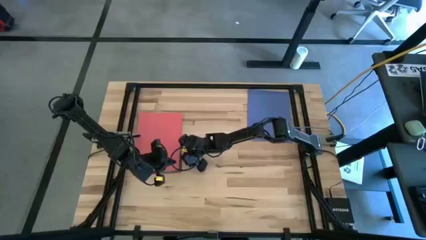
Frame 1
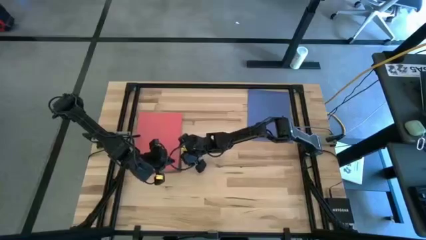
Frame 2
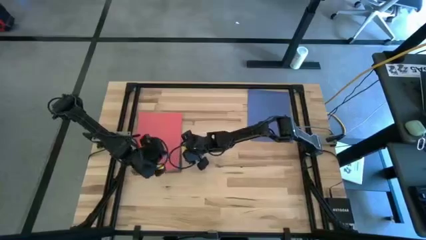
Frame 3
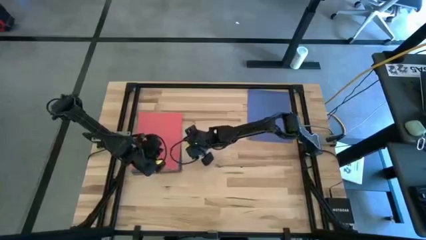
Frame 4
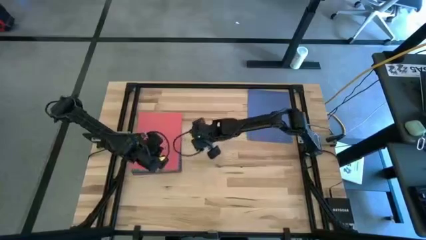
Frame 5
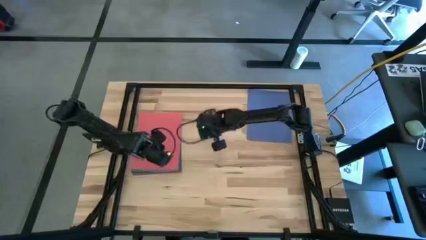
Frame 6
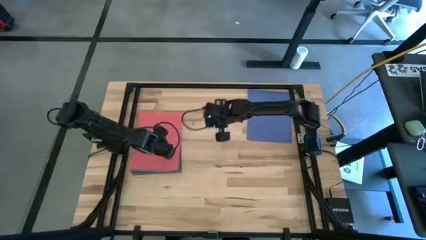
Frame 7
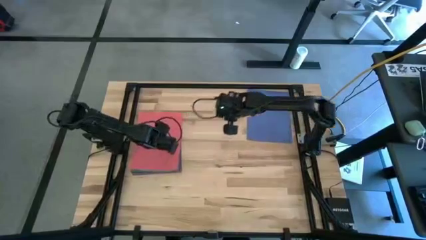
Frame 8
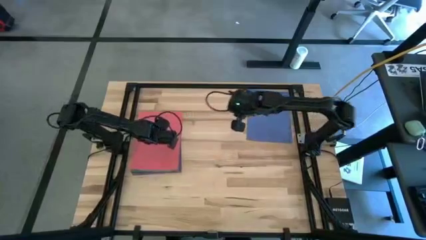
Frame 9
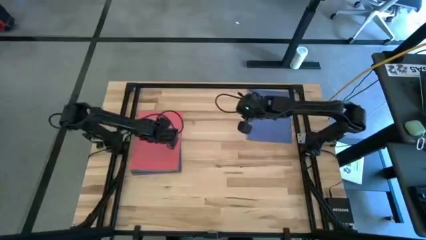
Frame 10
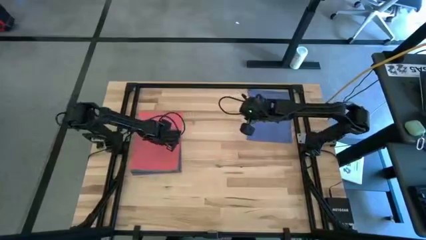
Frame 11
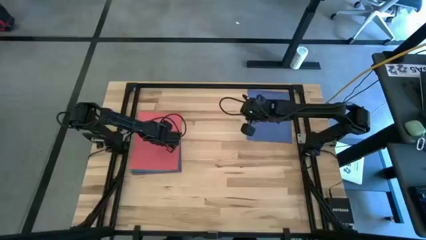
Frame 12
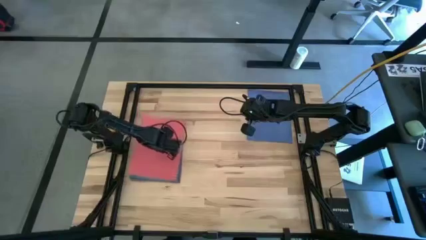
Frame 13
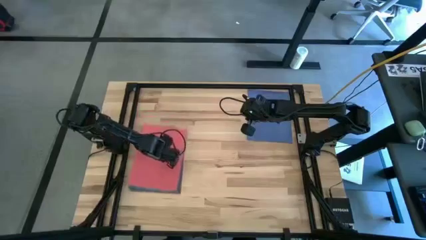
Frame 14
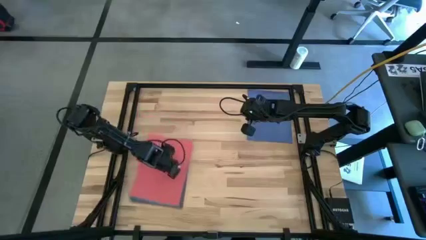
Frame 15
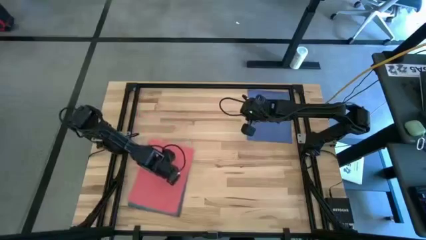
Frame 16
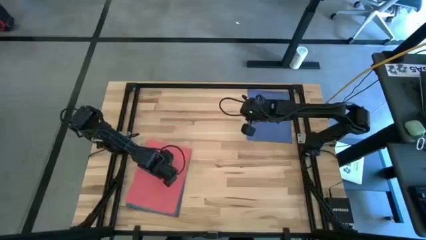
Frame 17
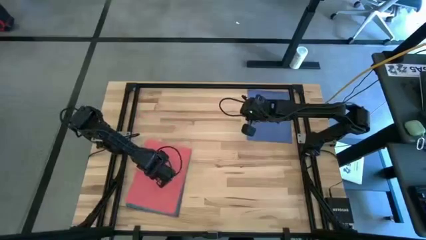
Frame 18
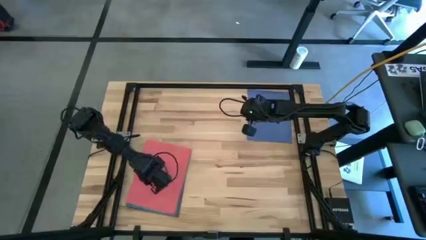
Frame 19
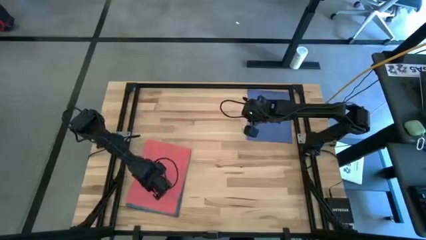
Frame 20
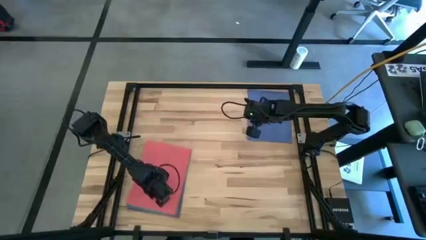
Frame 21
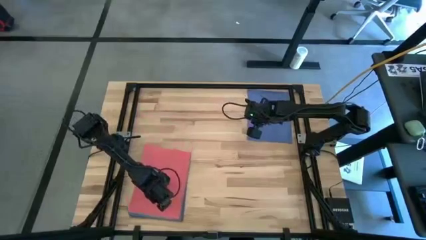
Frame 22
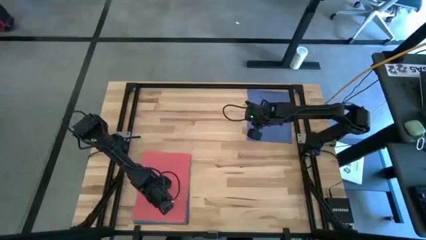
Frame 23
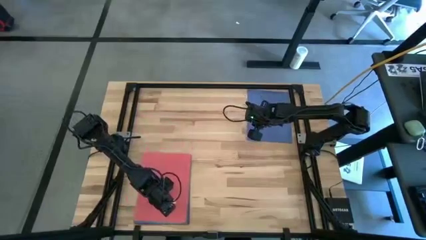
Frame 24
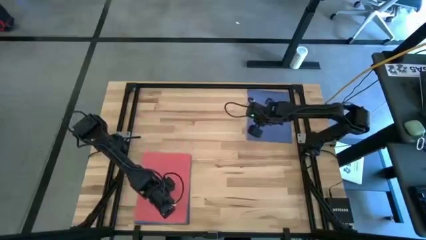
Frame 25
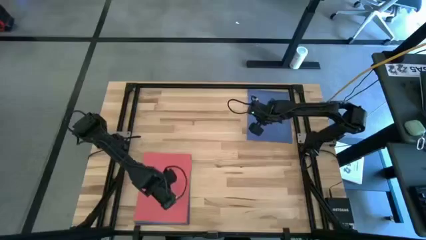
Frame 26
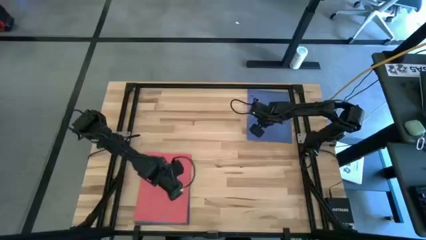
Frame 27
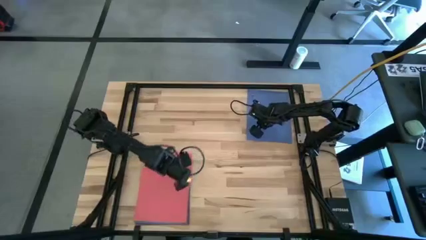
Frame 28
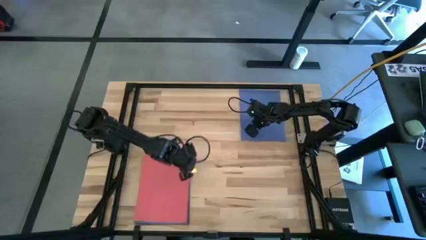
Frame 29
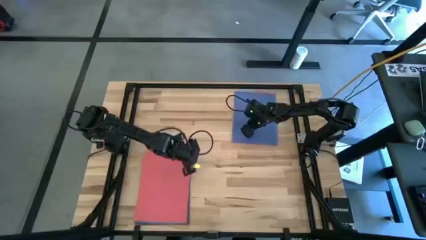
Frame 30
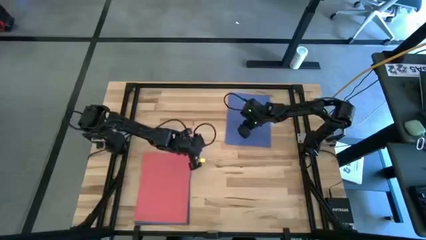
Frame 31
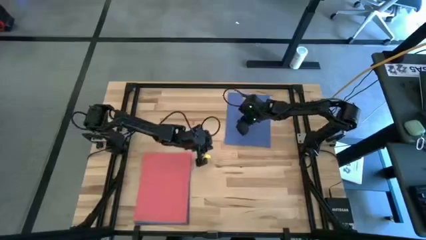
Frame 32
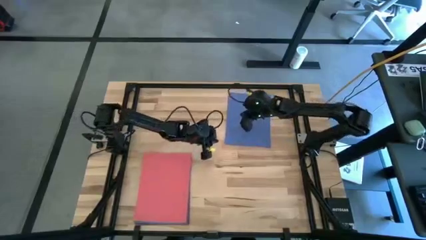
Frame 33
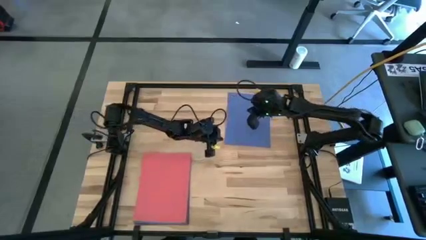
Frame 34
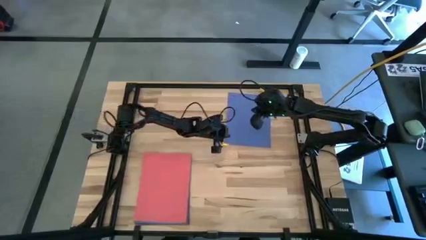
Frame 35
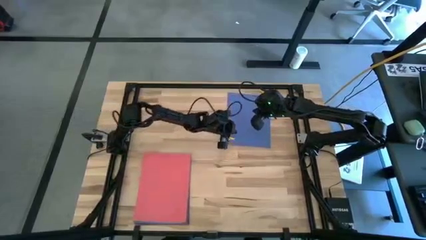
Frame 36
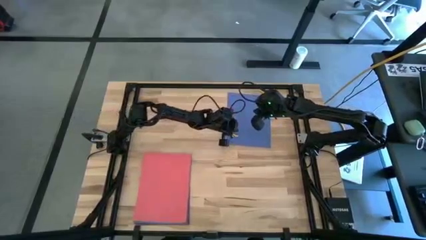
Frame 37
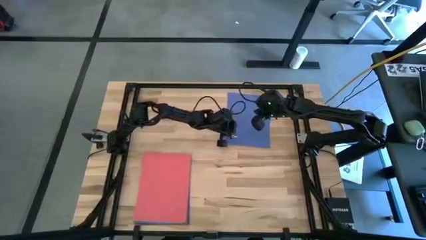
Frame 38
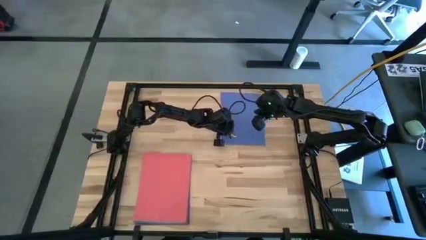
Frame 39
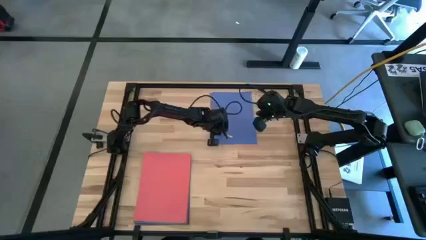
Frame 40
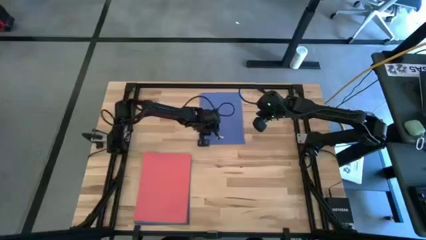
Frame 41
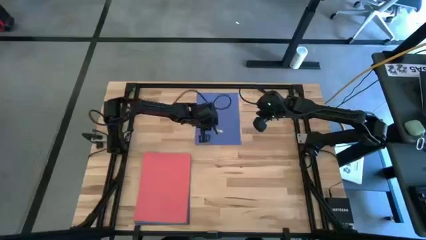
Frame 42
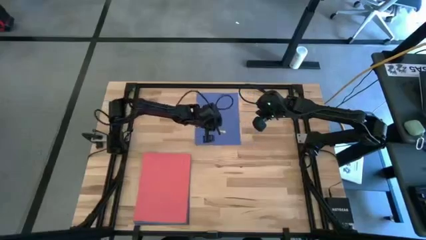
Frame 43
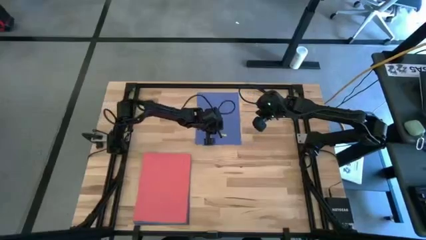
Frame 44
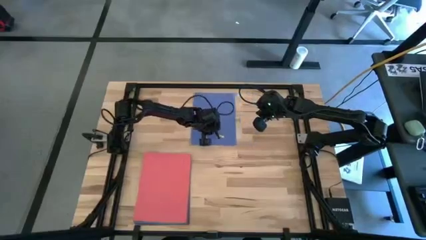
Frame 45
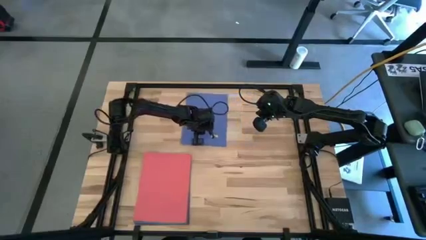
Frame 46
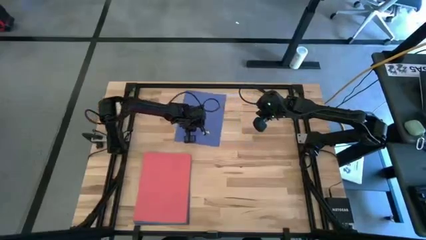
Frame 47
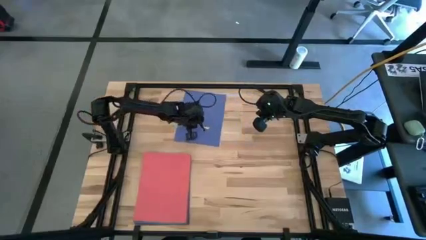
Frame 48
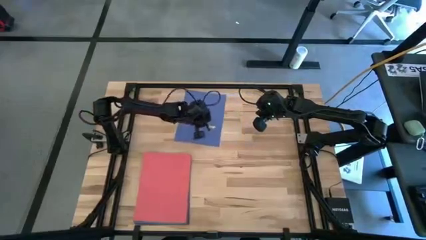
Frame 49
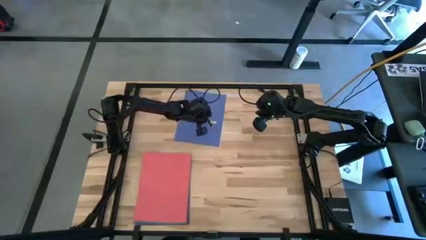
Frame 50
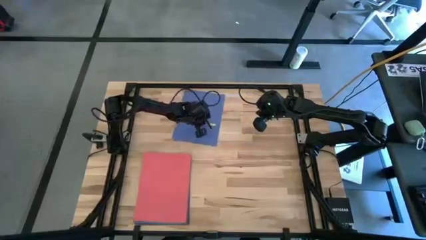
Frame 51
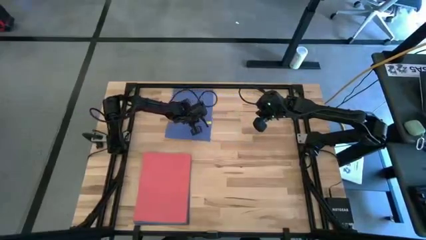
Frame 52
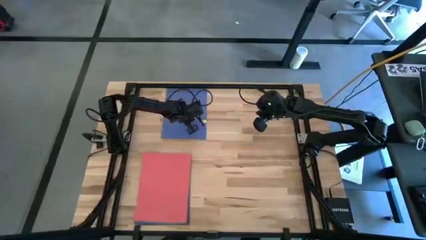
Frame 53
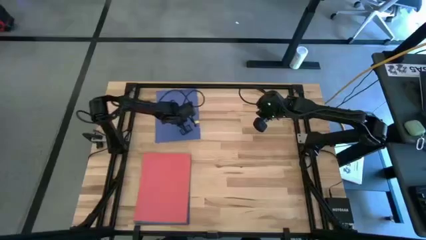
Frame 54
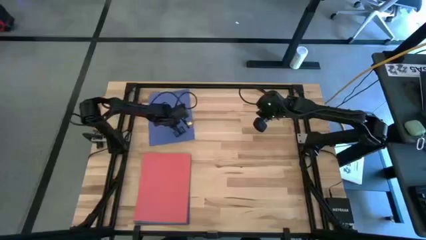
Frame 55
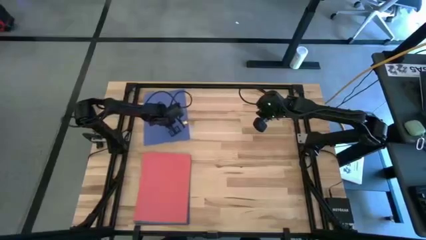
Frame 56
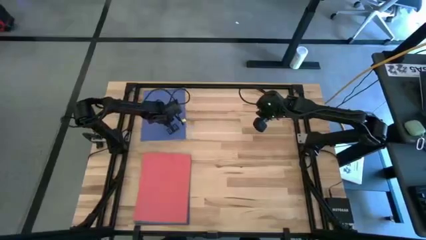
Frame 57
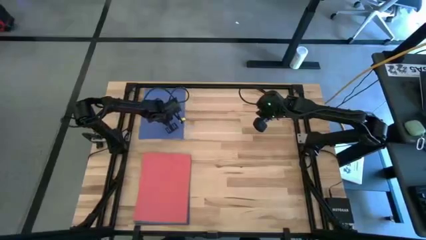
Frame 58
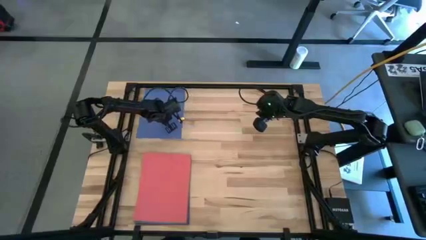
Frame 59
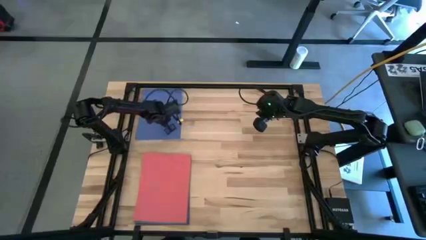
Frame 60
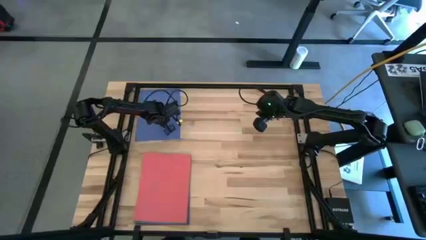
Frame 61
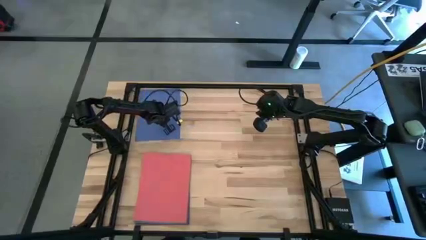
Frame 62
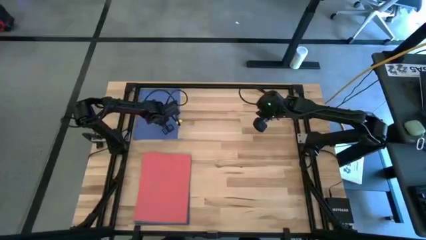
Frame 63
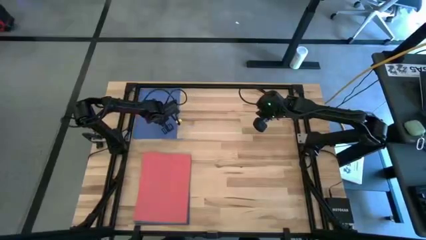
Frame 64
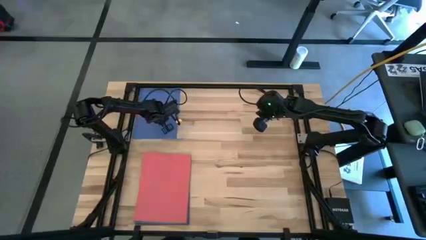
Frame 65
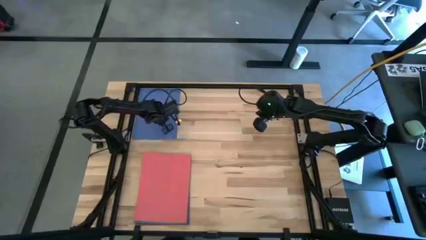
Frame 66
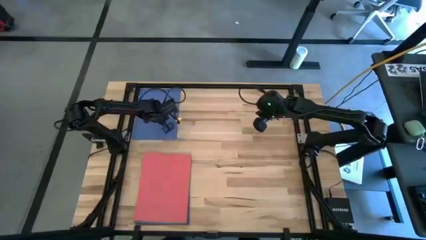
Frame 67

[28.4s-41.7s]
Task: Organize paper
Move the blue paper to the top left of the table

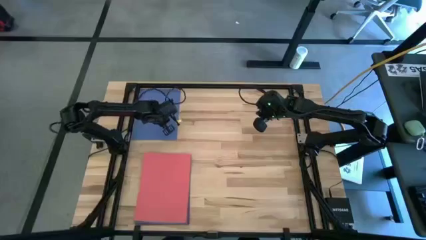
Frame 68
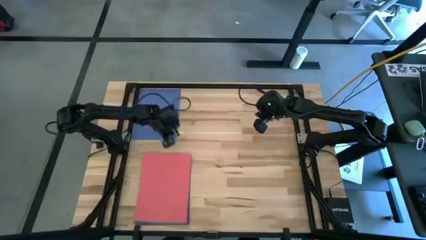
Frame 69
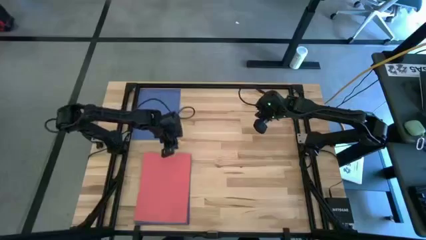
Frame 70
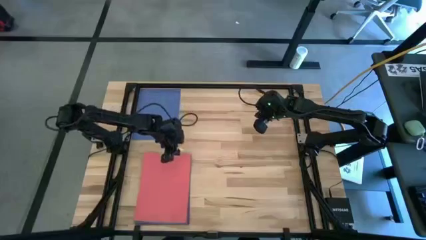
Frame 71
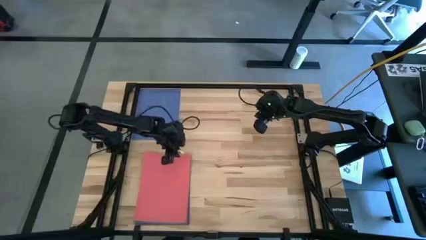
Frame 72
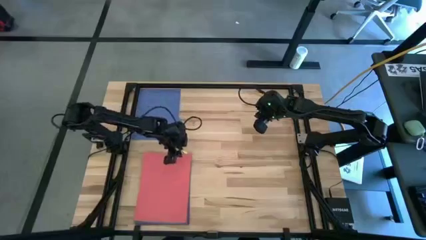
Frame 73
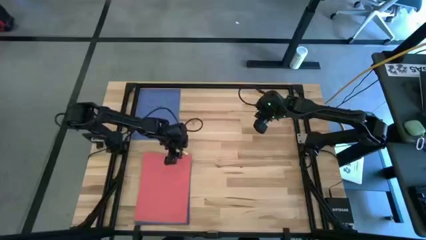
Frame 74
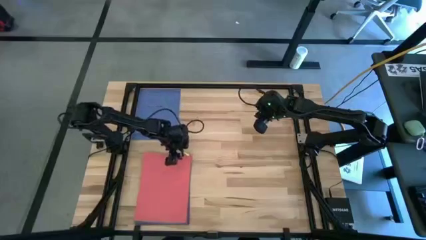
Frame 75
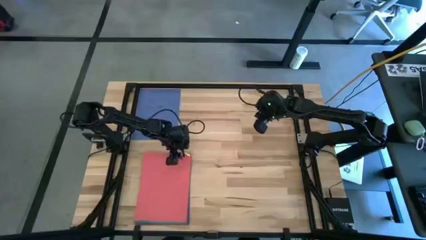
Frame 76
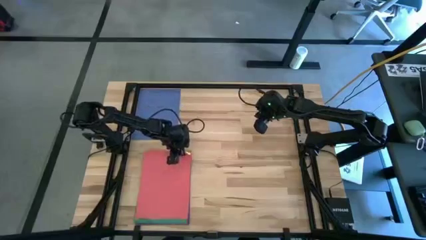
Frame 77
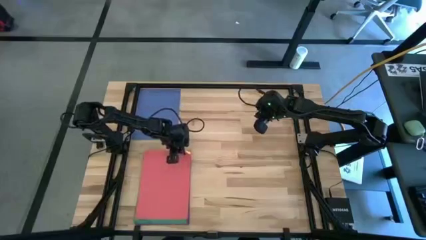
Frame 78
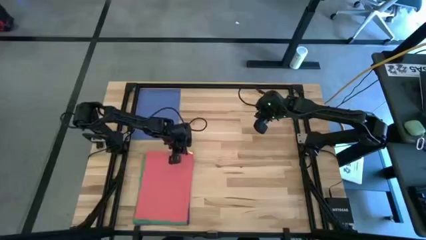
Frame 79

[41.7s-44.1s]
Move the red paper to the top right of the table
